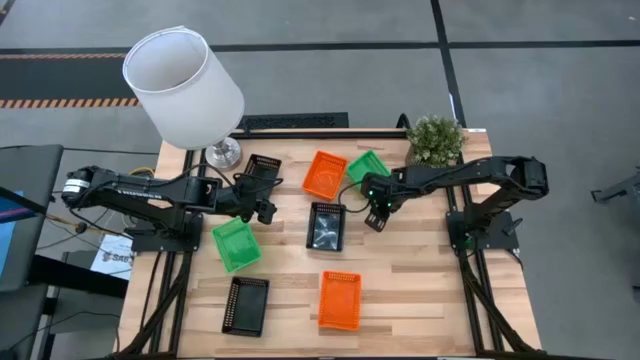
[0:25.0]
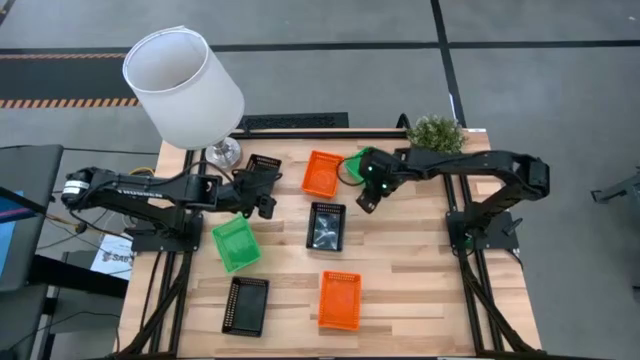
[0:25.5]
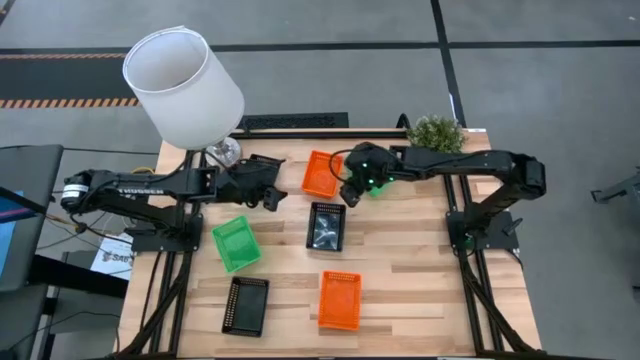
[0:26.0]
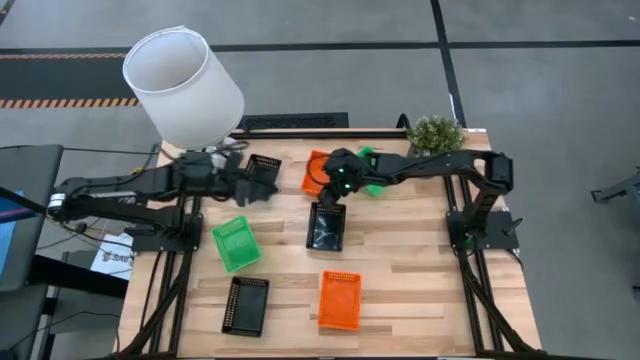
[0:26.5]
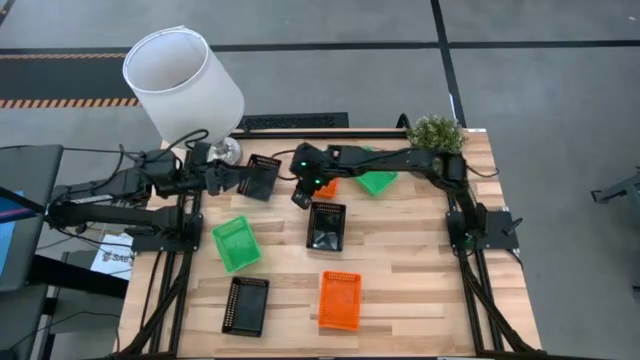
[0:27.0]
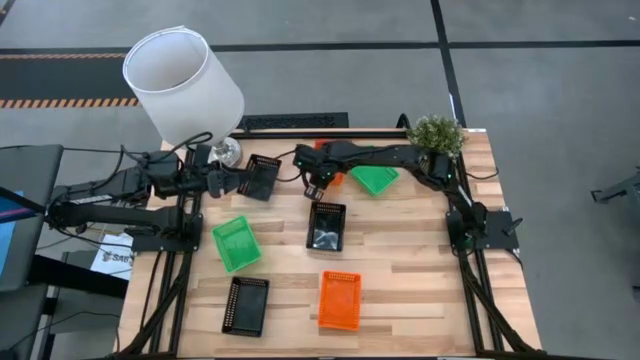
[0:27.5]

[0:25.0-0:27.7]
Adjust the top orange bin

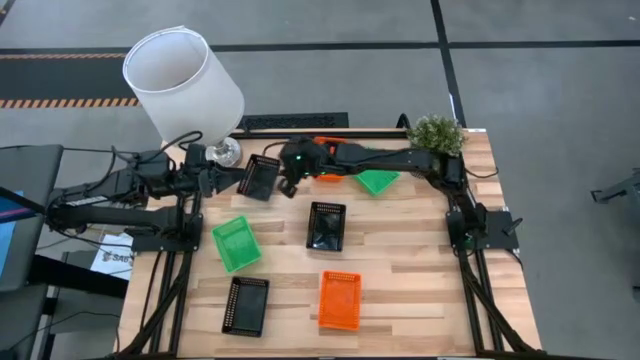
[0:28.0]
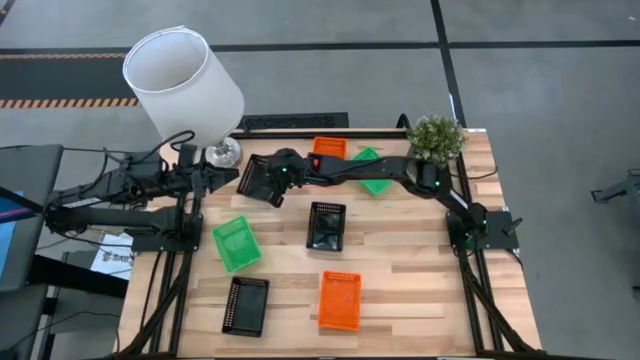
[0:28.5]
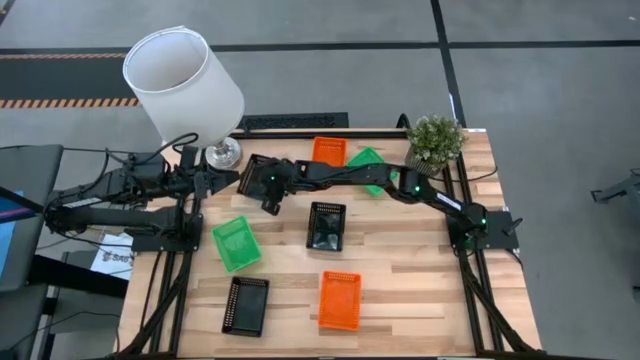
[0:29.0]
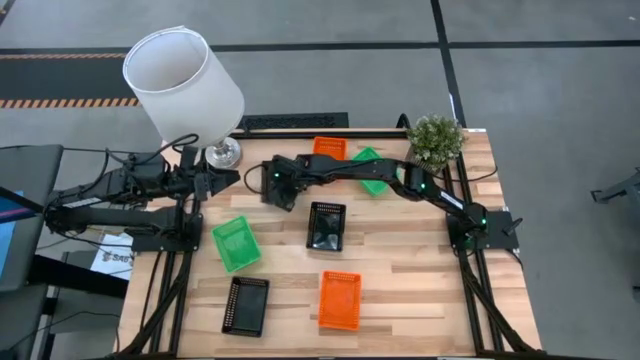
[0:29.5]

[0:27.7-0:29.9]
Prepare the top black bin

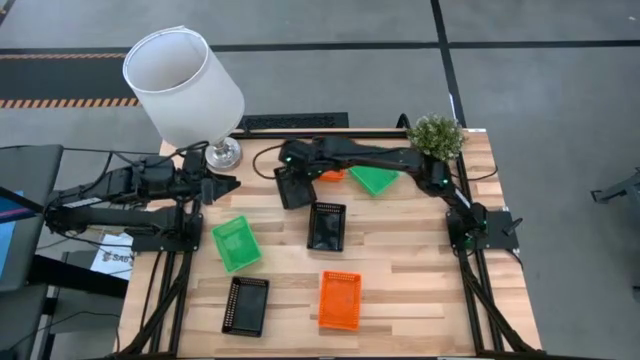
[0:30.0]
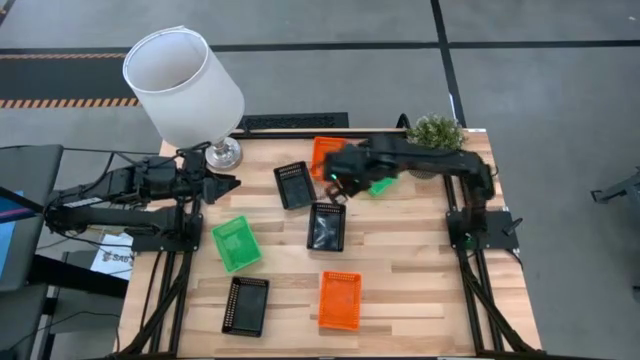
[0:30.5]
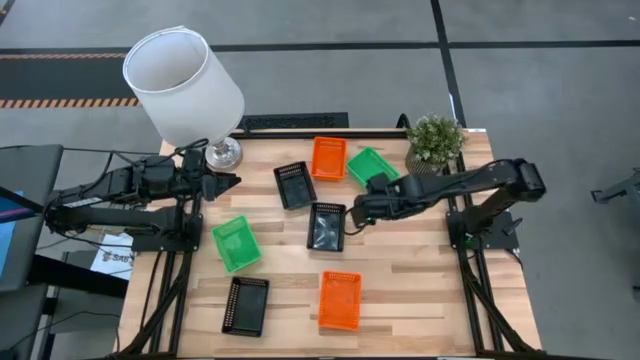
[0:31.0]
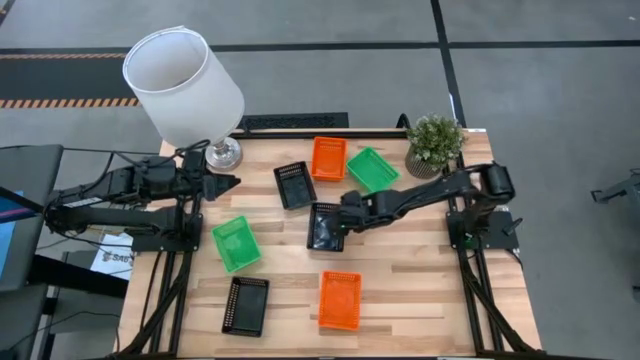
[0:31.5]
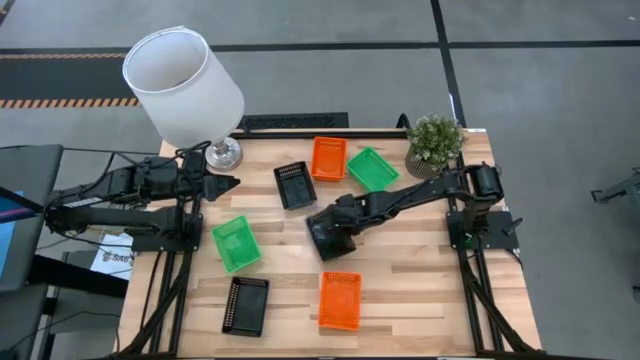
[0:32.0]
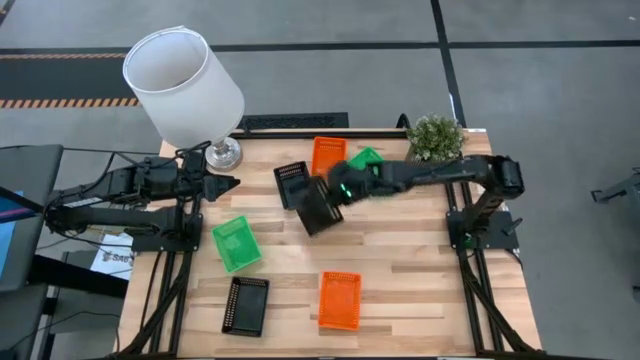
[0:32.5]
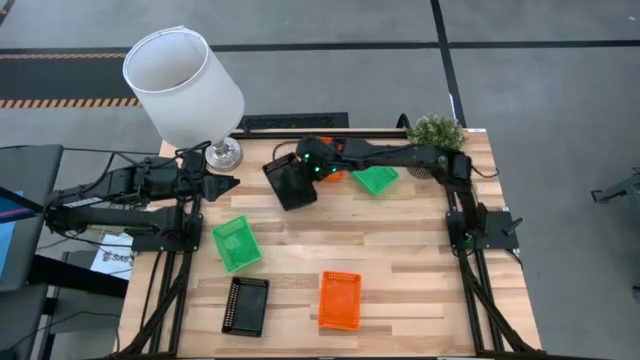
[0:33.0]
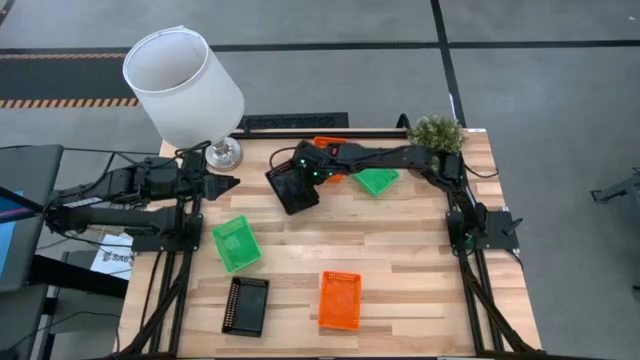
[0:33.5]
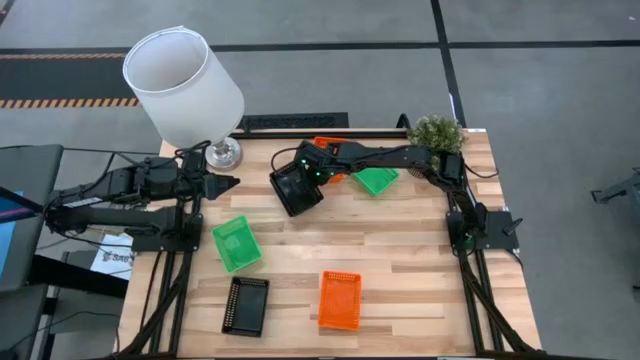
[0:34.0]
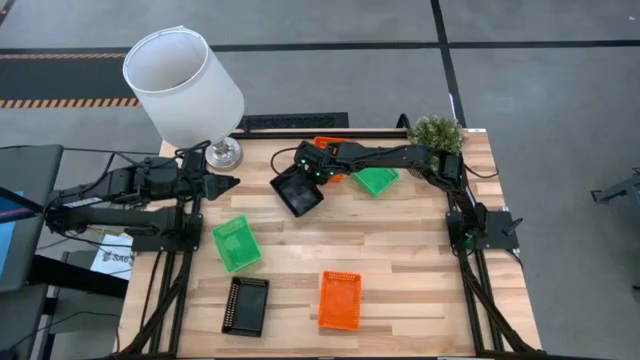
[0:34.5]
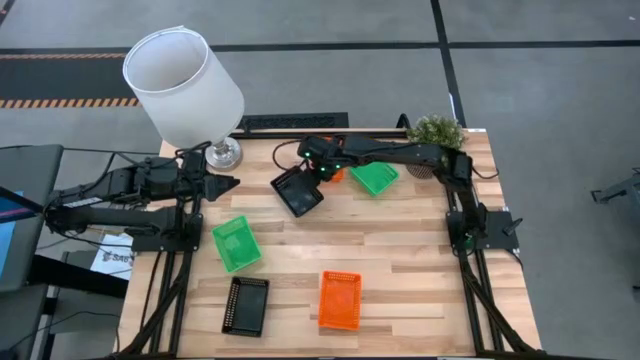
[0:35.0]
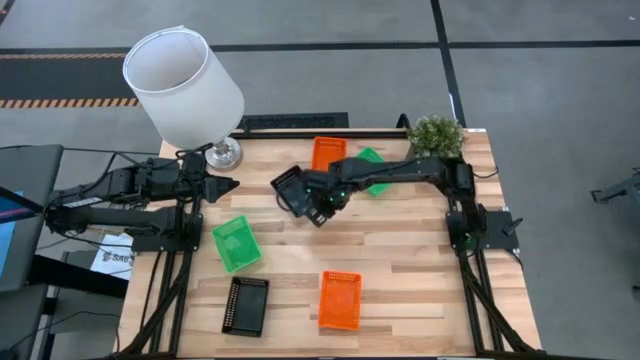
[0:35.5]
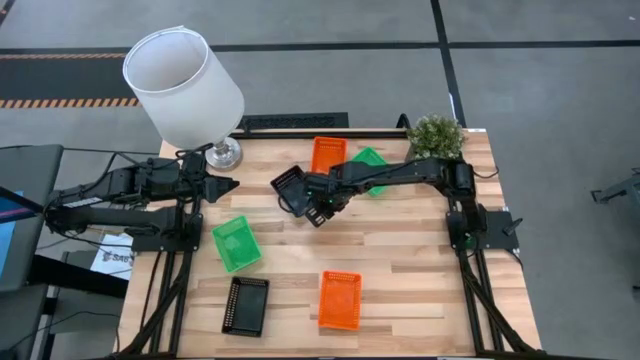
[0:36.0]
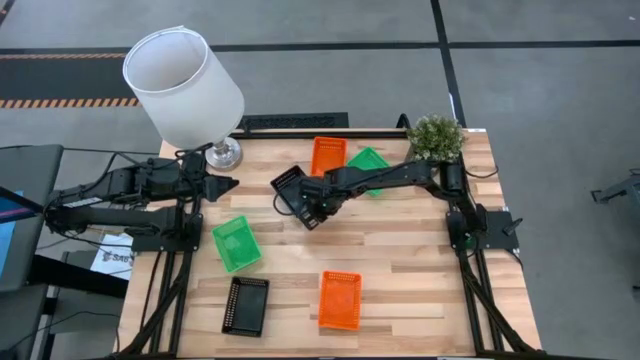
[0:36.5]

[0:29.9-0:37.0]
Stack the middle black bin on top of the top black bin

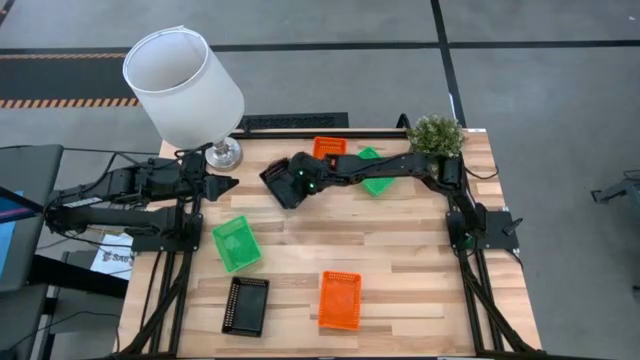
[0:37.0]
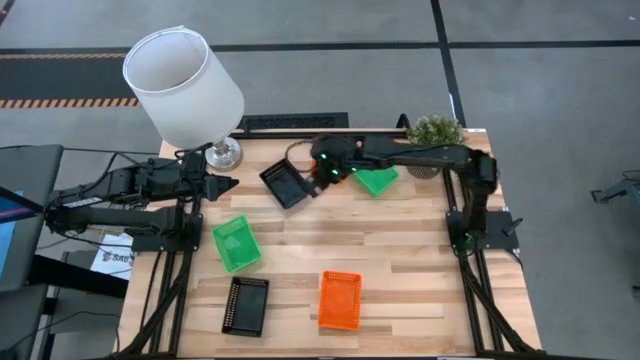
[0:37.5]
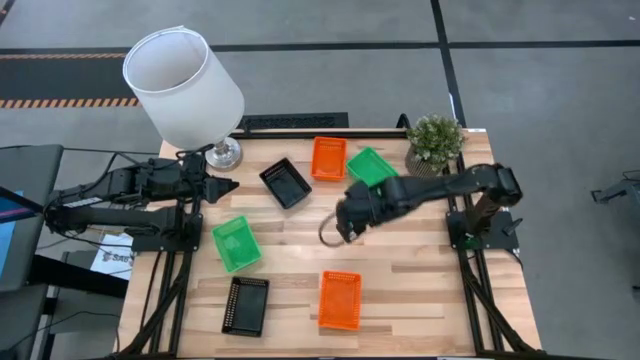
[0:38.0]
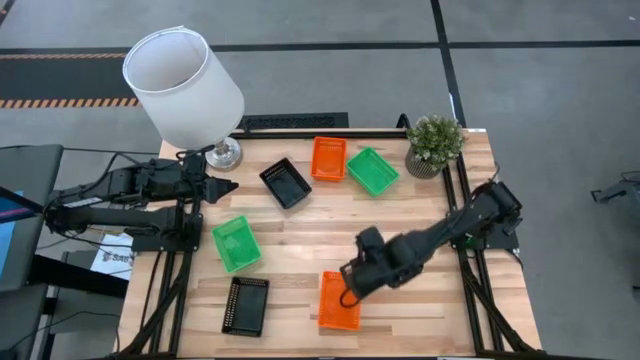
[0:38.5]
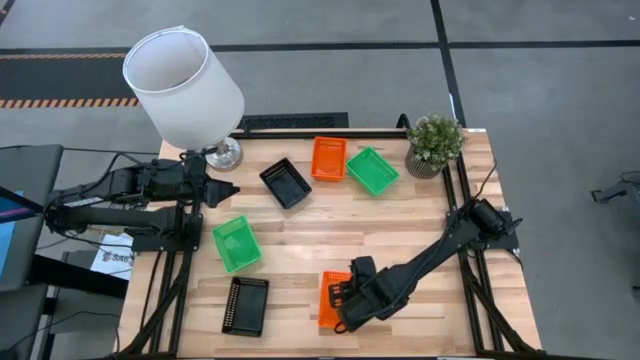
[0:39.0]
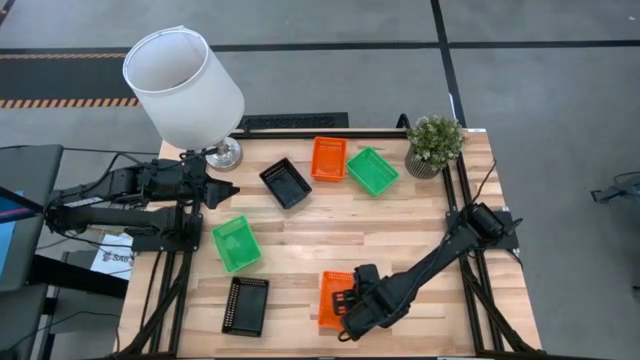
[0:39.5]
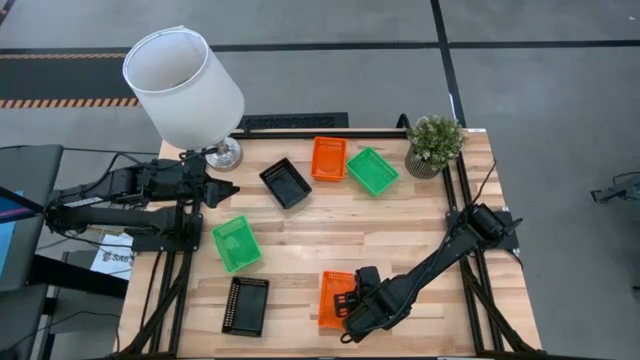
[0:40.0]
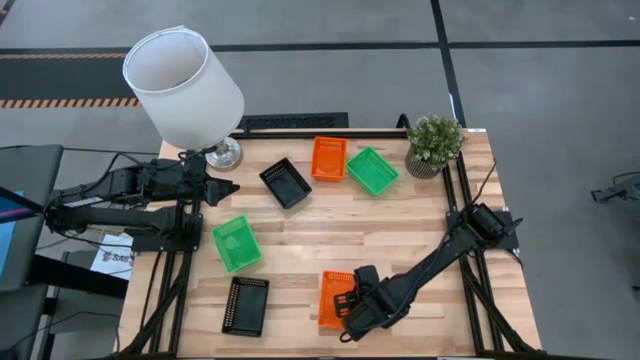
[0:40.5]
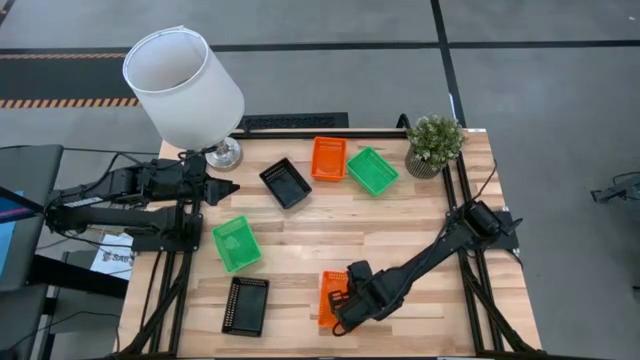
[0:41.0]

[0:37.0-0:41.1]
Stack the bottom orange bin on top of the top orange bin

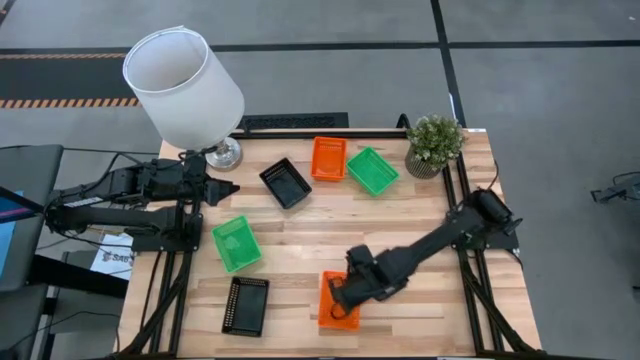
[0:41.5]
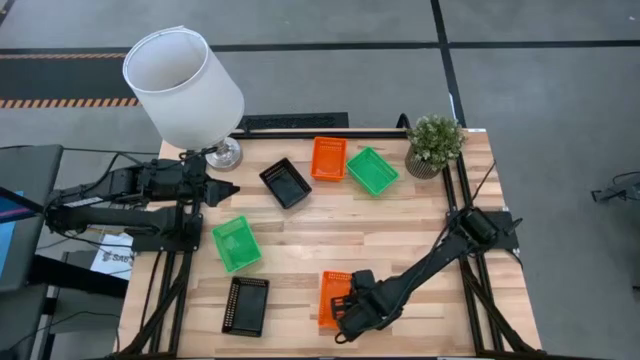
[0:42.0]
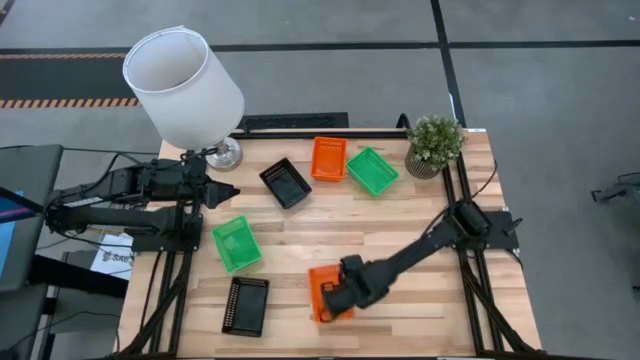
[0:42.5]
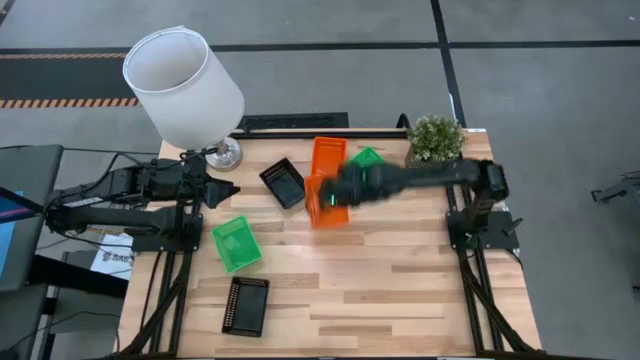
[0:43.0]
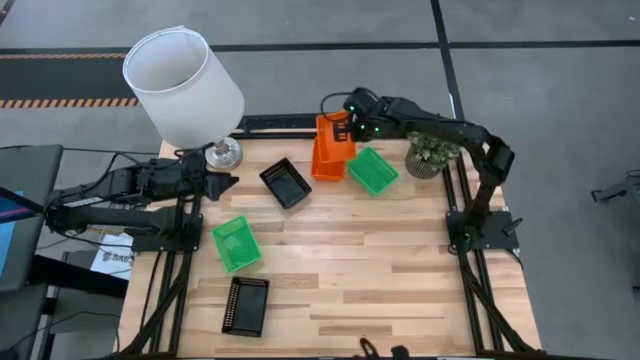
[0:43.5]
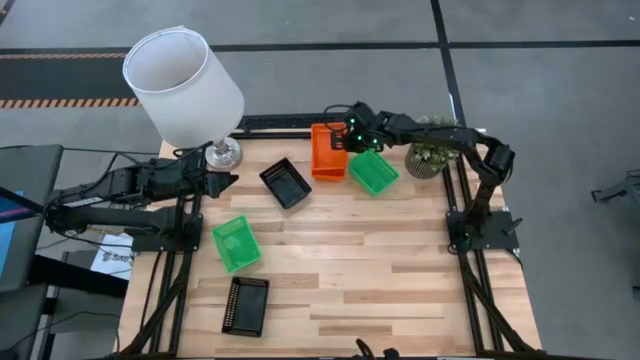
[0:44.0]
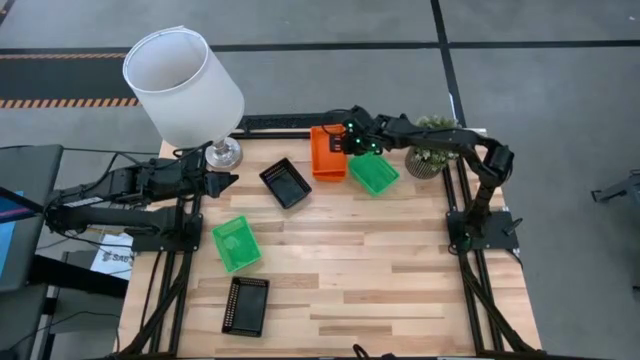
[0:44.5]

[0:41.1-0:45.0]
Stack the bottom orange bin on top of the top orange bin
